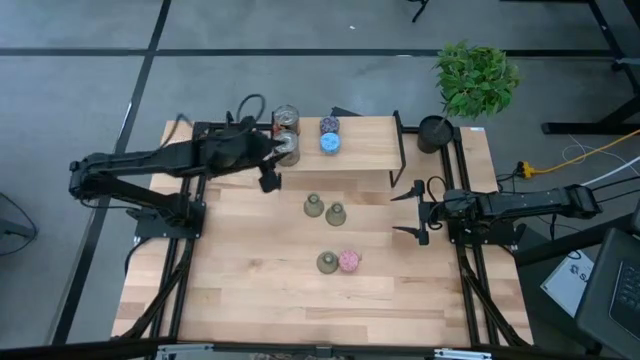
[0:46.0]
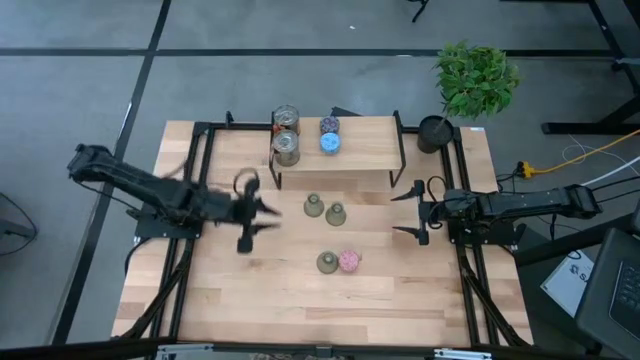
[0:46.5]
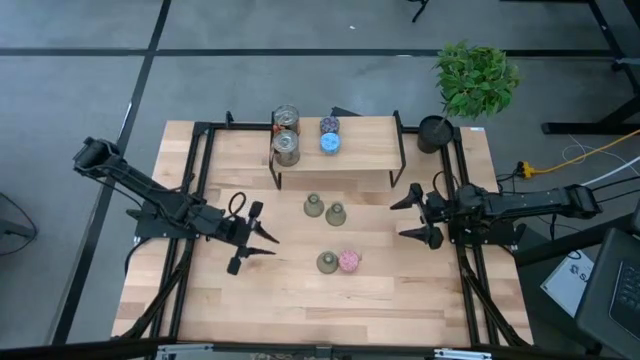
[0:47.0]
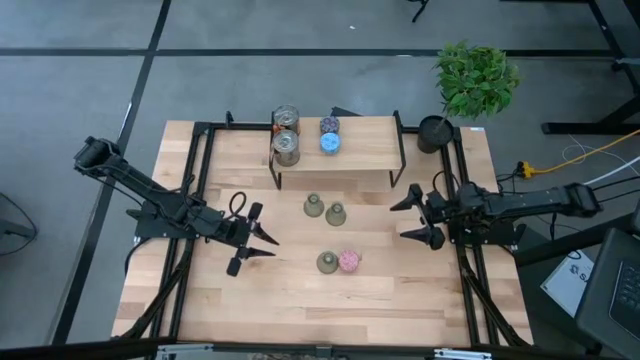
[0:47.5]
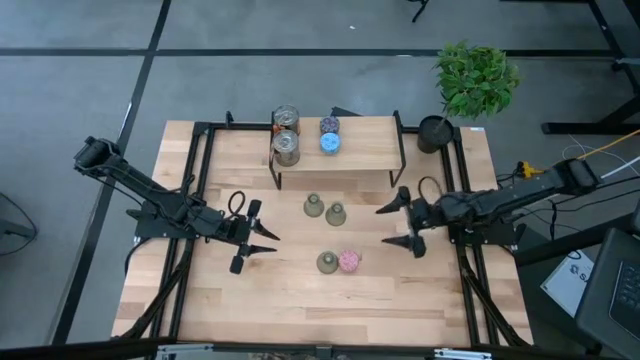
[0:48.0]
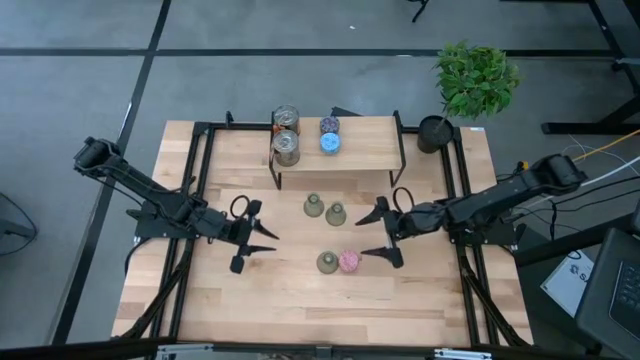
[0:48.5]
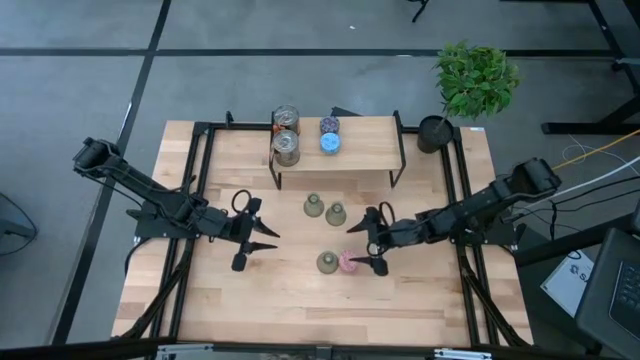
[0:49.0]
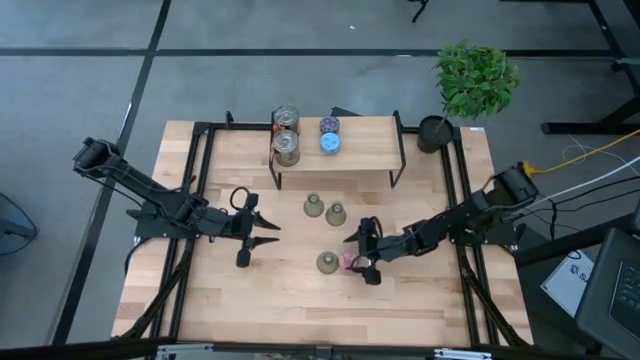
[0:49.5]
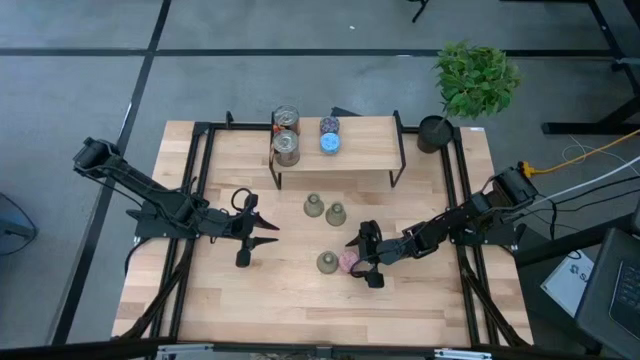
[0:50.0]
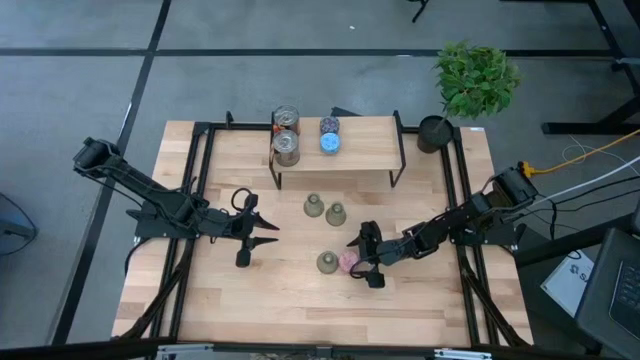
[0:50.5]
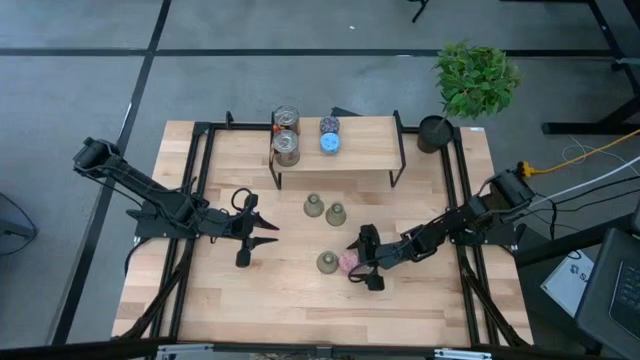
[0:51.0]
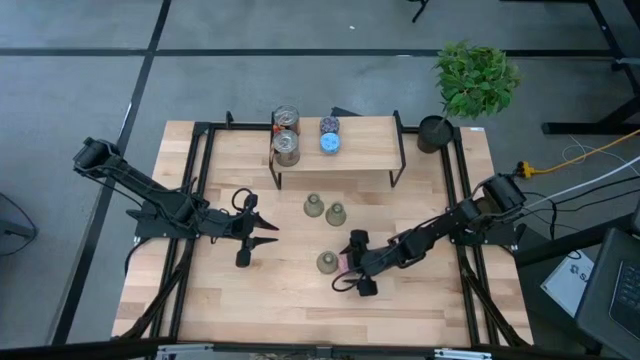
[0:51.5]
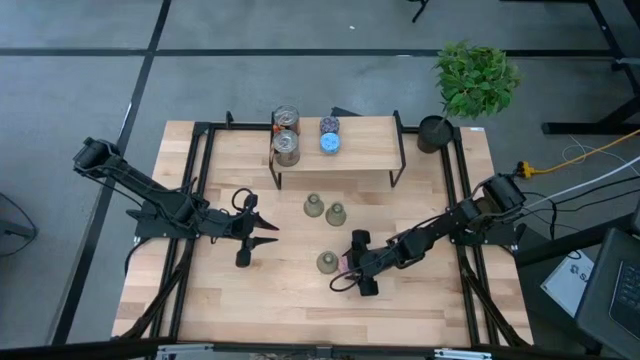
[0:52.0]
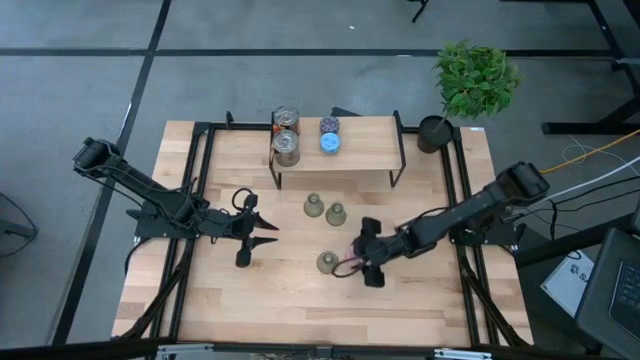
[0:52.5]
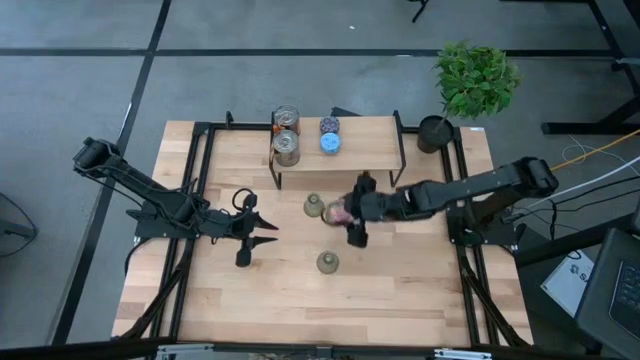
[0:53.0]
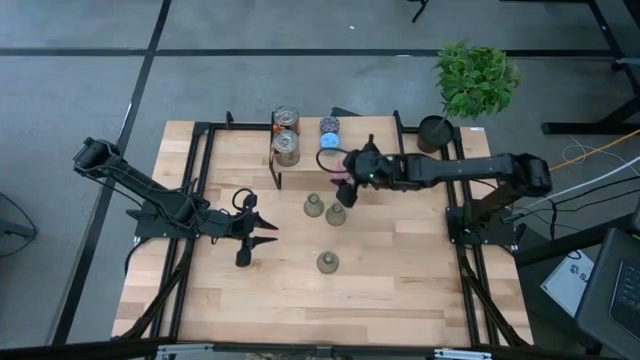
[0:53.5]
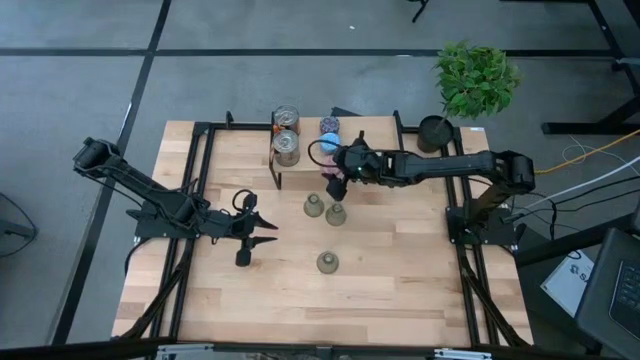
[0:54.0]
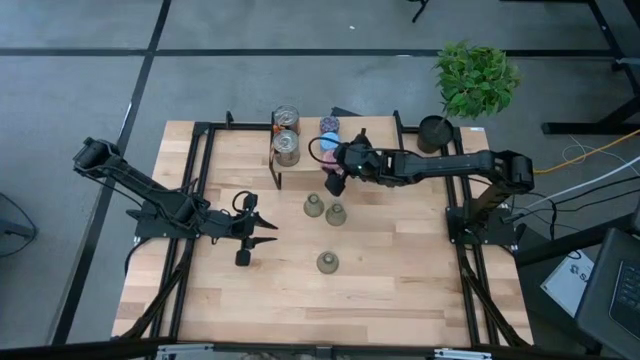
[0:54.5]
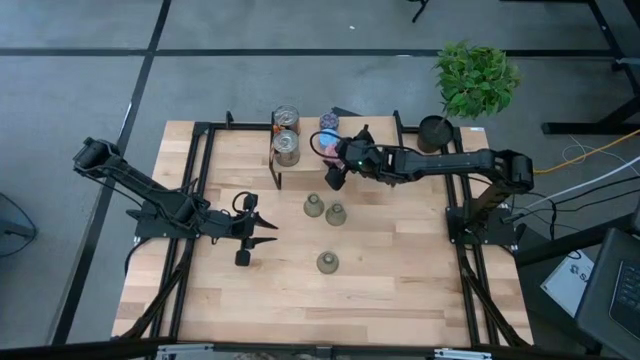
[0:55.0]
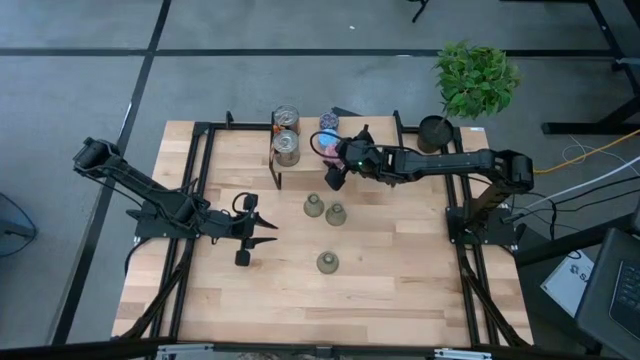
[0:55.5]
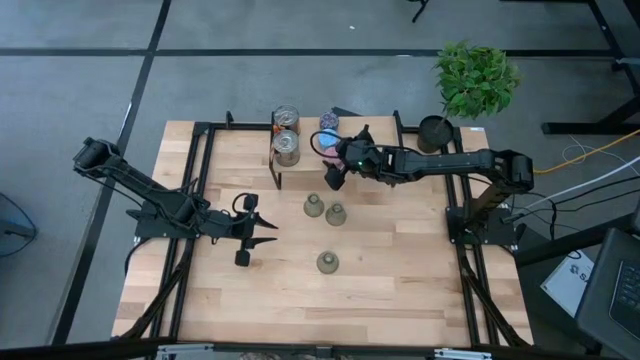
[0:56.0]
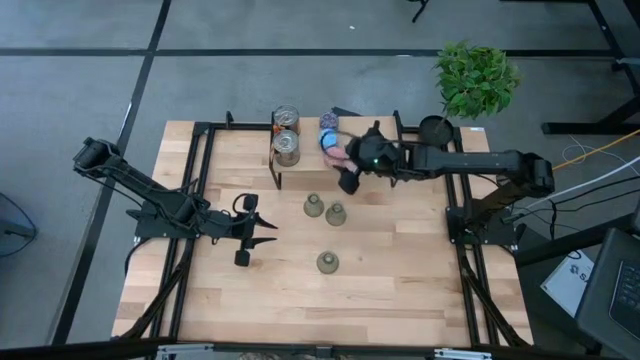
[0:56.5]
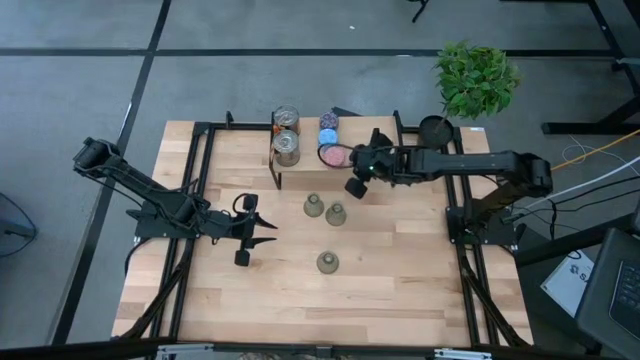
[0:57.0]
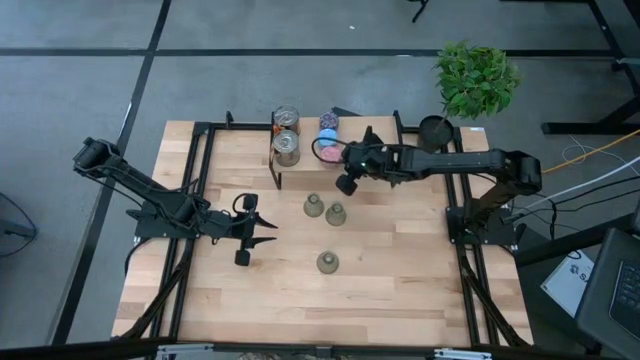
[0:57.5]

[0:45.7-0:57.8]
Task: Pick & Place candle stick holders
Put the pink scented candle on the shelf aligned with the other scented candles

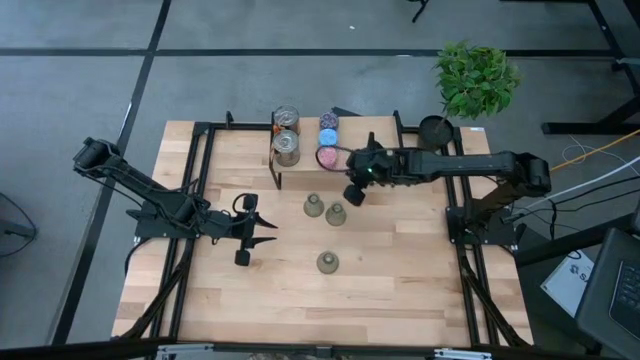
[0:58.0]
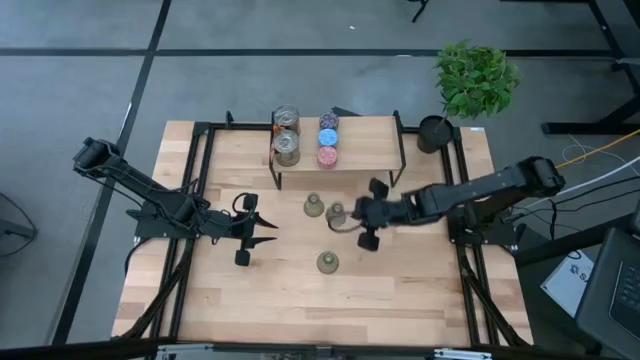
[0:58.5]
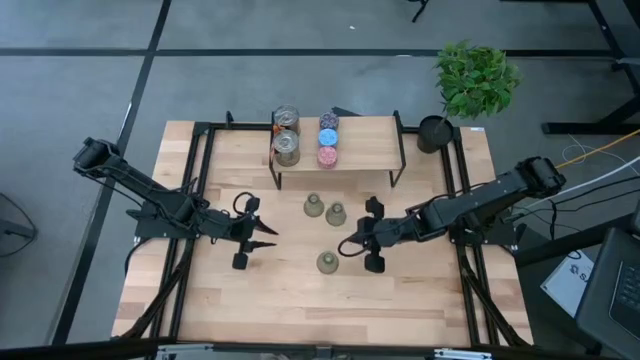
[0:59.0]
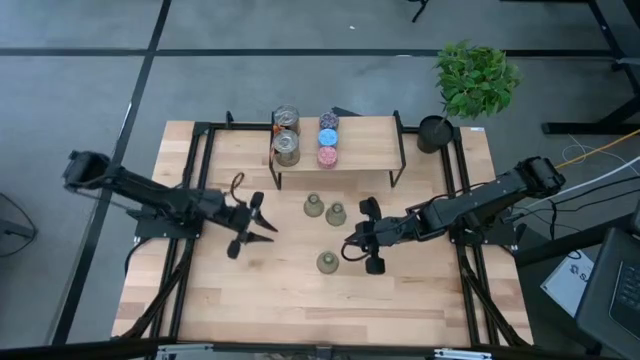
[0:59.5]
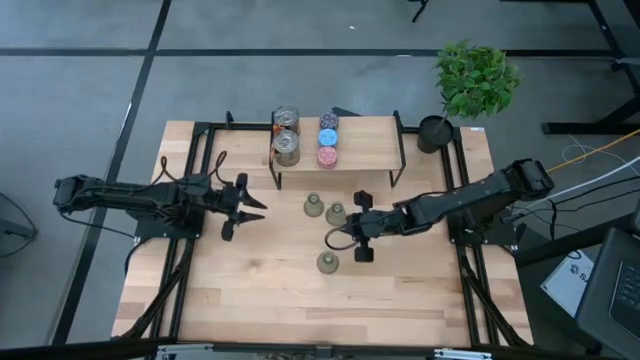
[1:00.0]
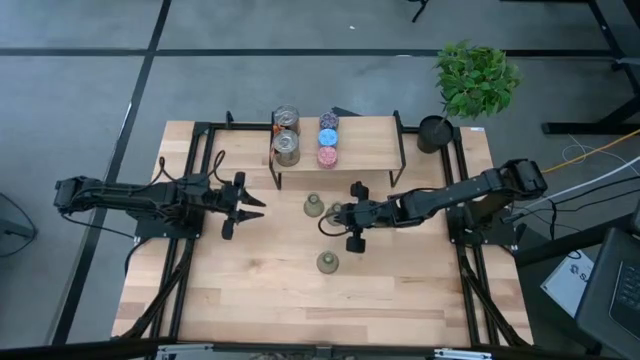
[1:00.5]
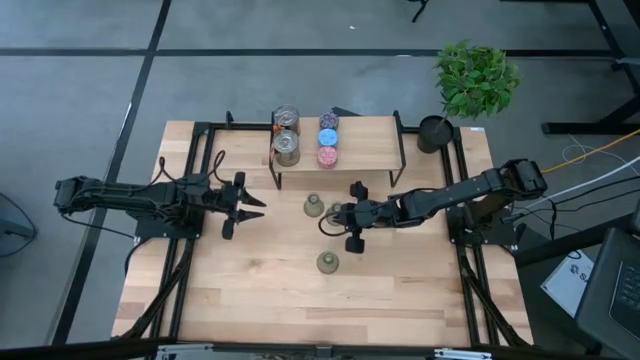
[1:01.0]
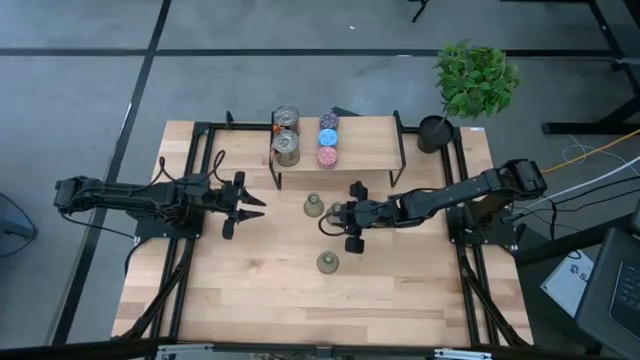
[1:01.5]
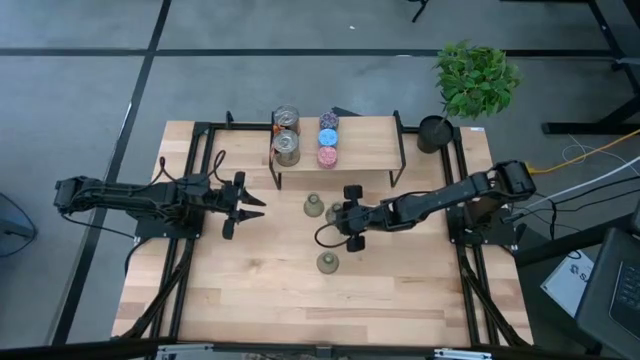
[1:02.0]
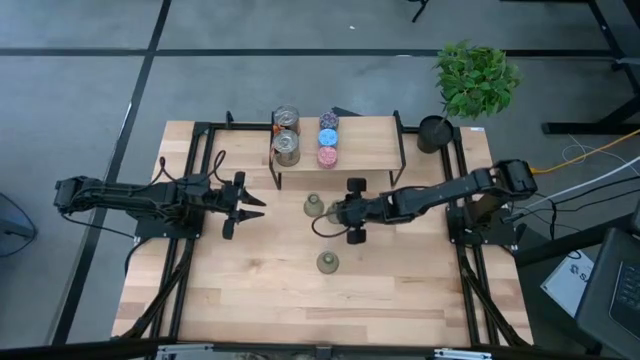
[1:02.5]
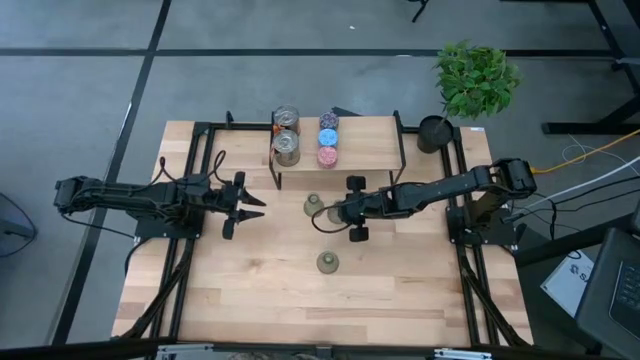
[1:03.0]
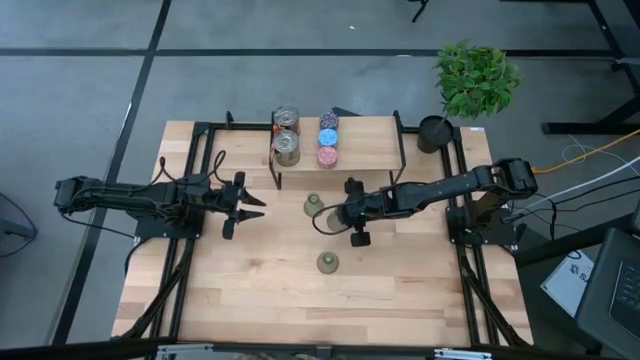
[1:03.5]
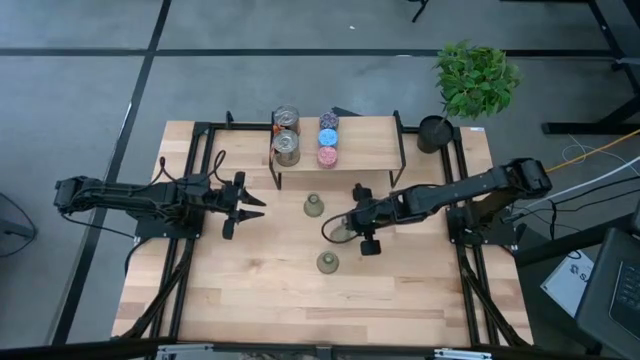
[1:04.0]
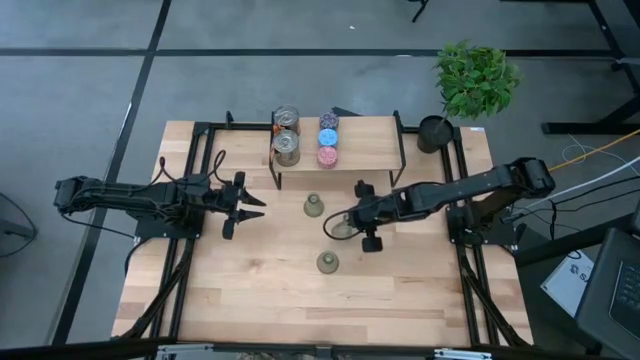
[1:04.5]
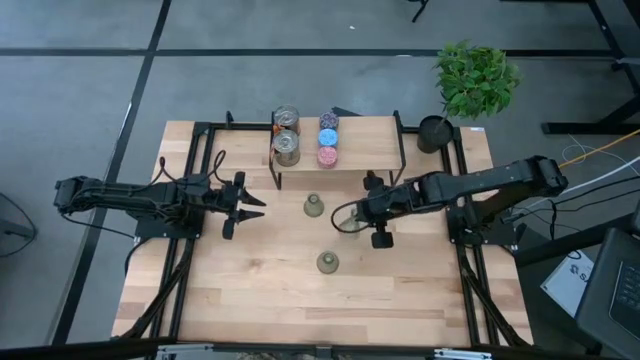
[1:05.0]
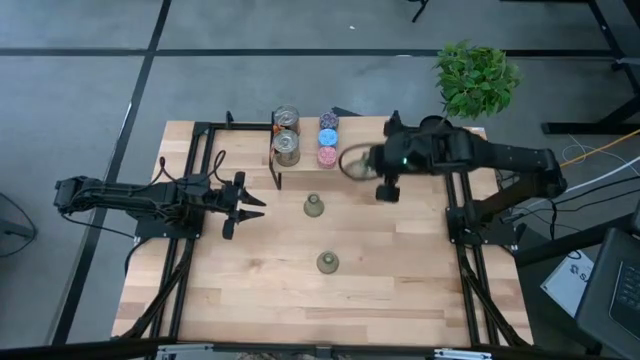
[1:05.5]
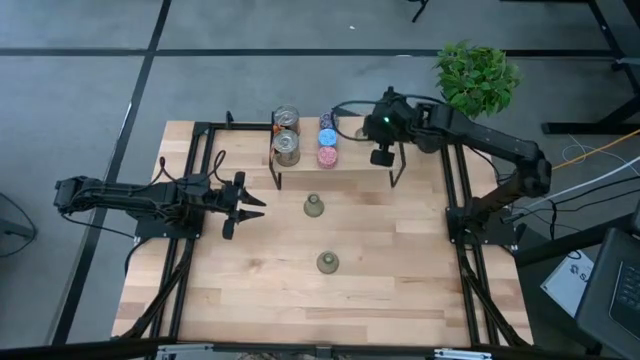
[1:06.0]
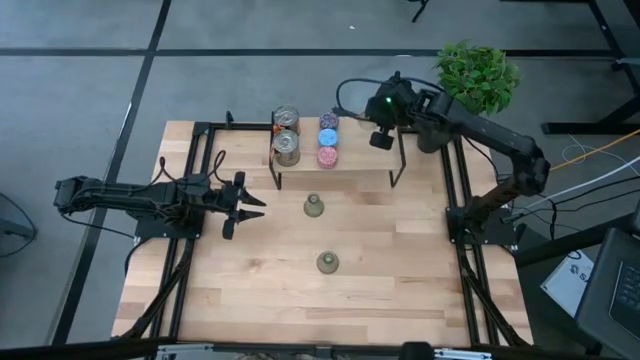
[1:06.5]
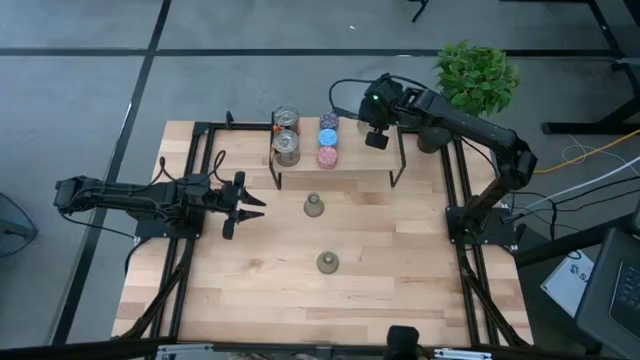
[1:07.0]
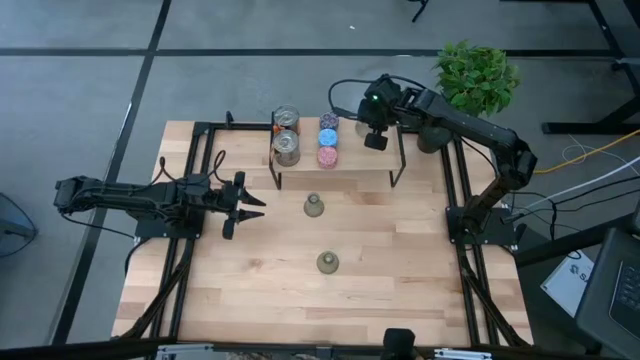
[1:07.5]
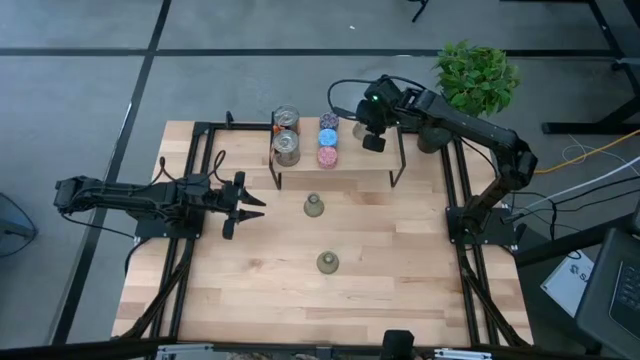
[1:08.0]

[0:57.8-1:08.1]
Put the top right green glass candle holder on the shelf
